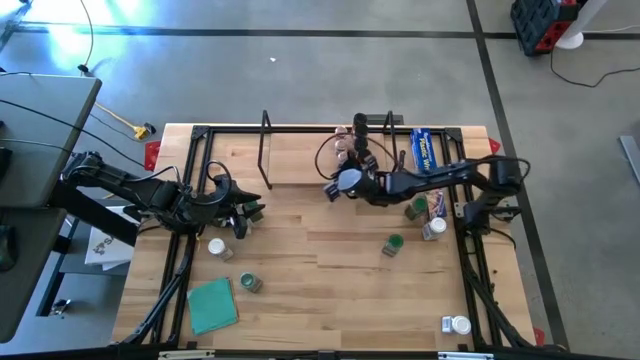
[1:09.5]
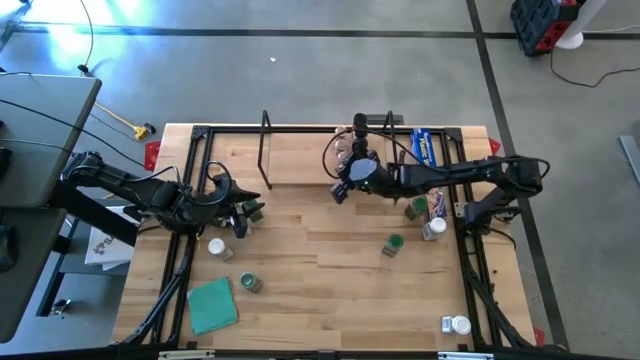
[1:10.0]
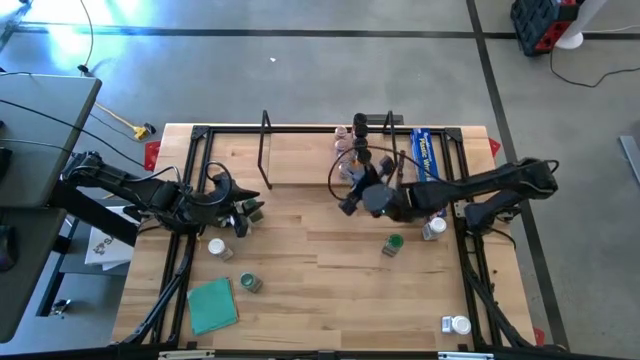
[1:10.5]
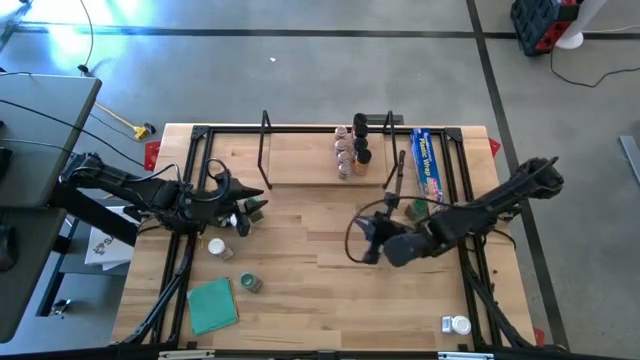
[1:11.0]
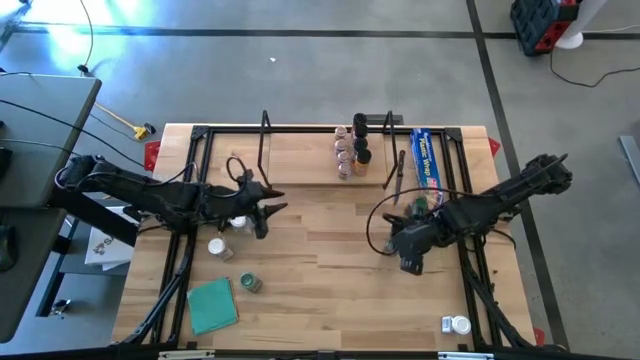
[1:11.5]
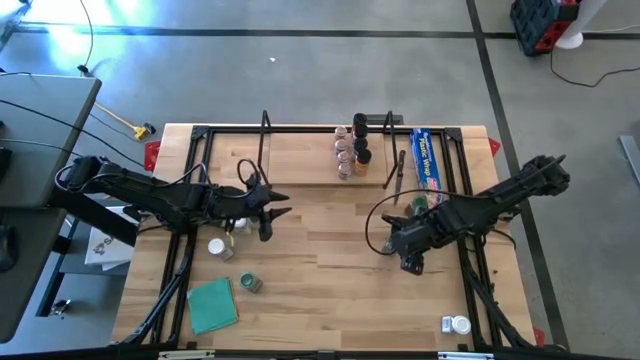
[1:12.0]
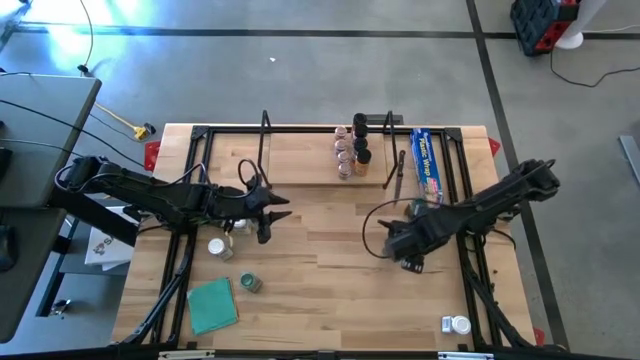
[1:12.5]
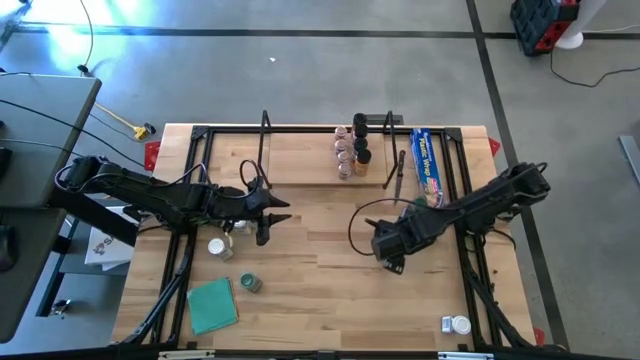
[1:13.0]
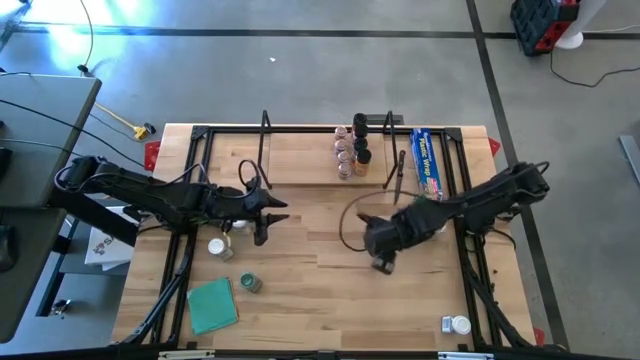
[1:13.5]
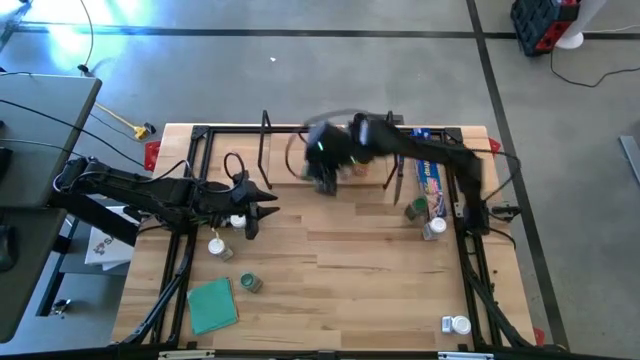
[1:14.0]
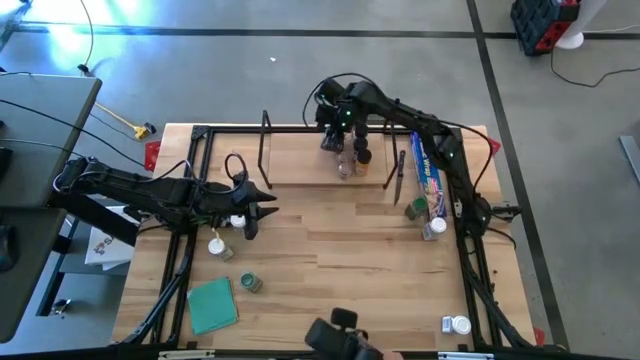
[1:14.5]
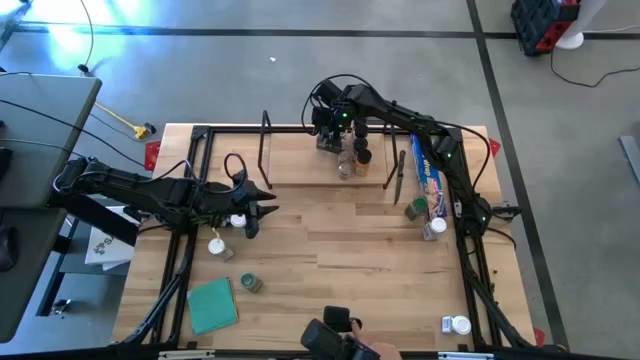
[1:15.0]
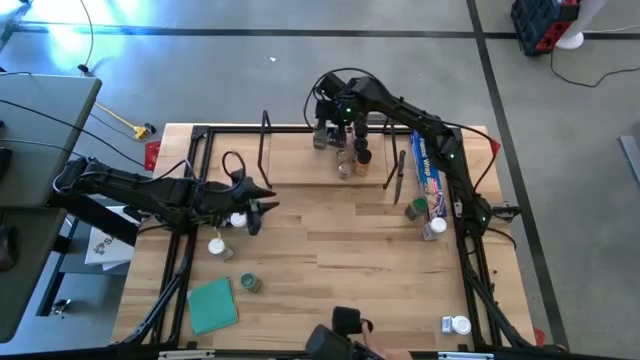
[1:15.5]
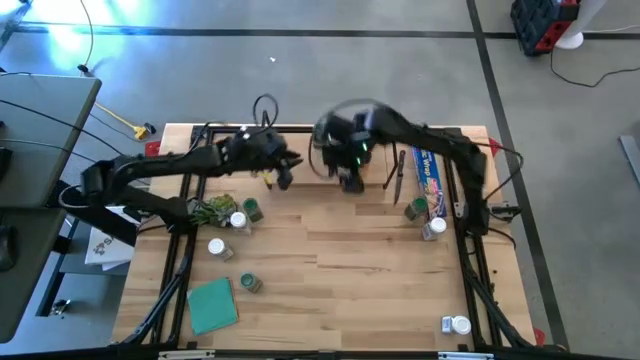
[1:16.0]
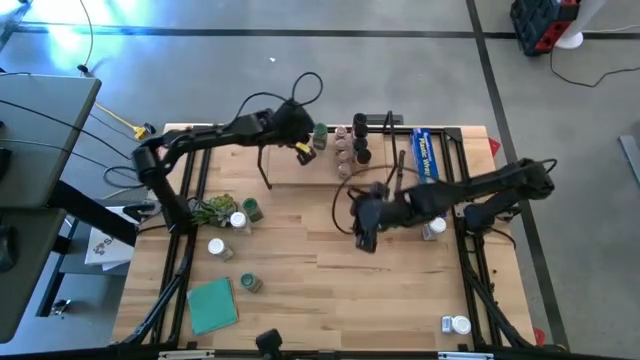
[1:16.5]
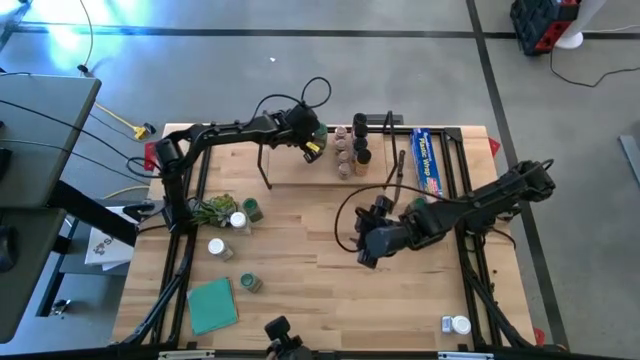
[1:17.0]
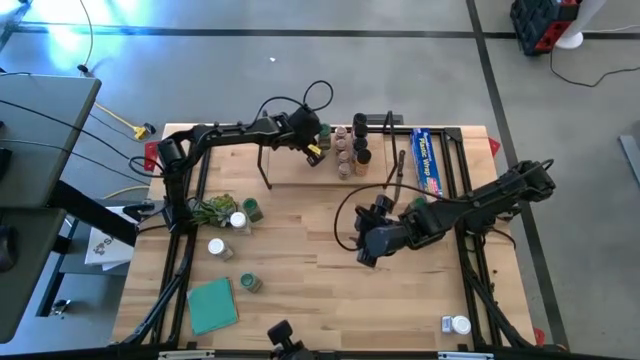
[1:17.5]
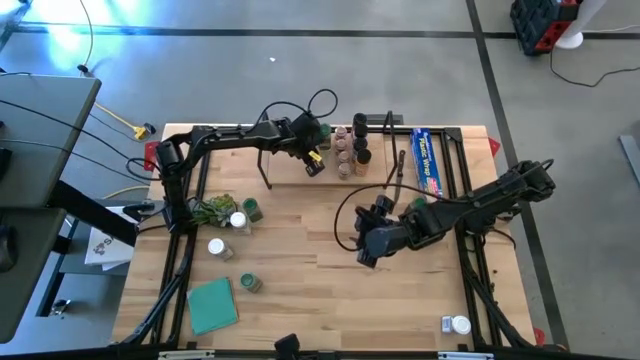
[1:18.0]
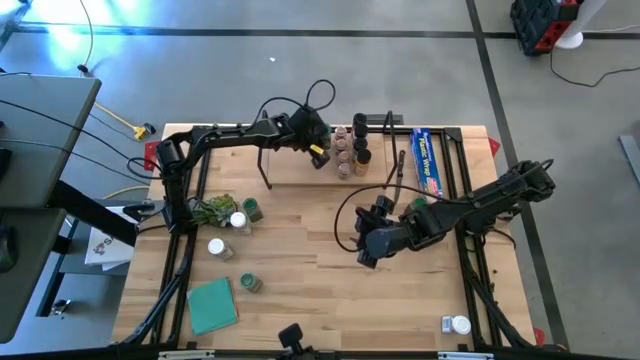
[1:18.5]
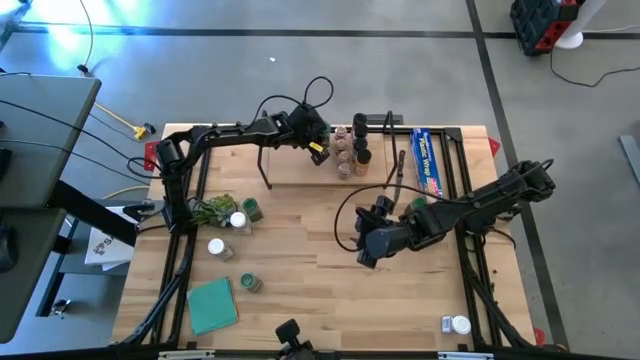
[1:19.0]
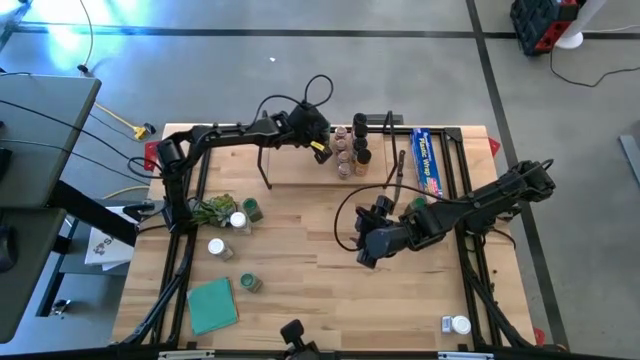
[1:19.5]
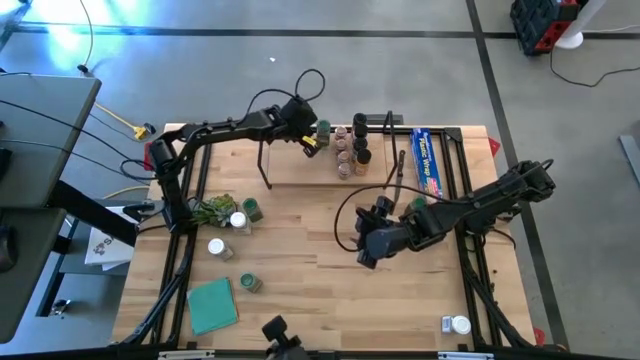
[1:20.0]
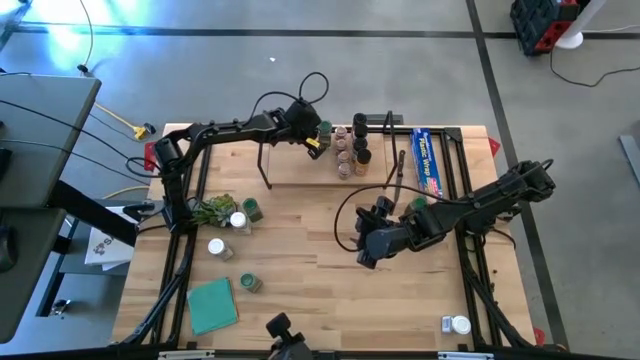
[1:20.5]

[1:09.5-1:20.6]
Task: Shelf spices
Put the green seasoning bottle on the shelf

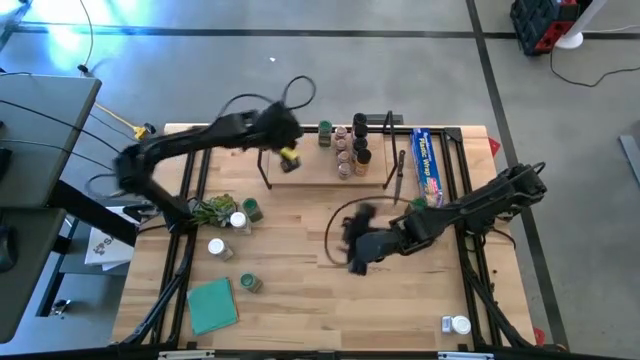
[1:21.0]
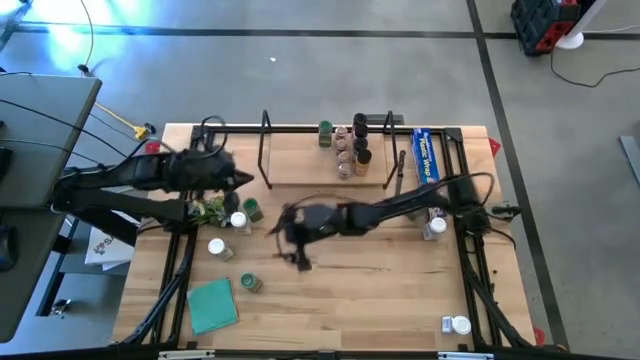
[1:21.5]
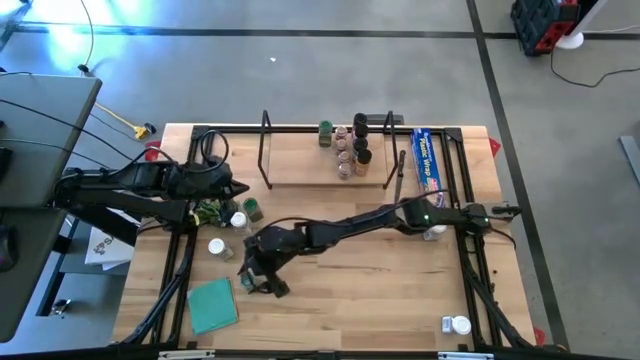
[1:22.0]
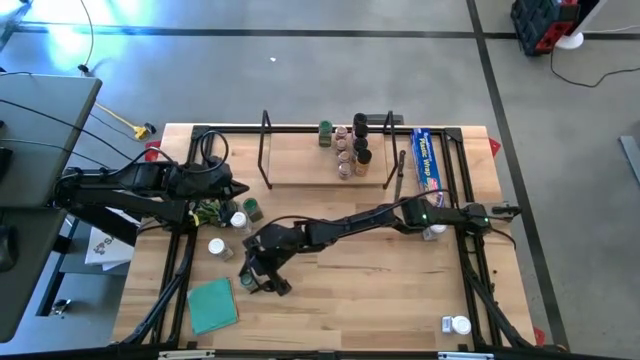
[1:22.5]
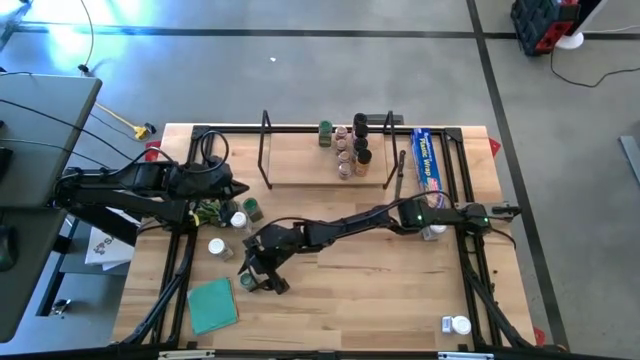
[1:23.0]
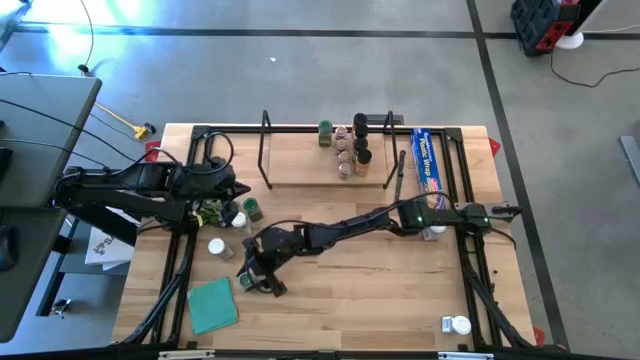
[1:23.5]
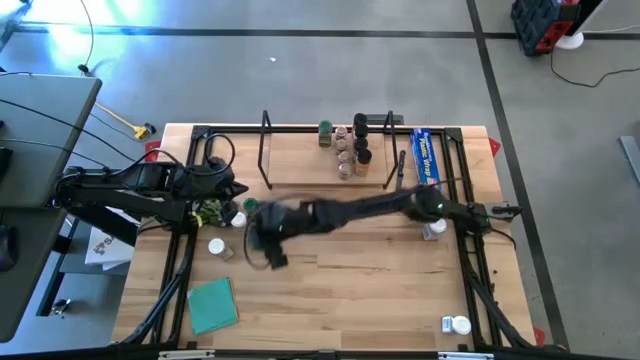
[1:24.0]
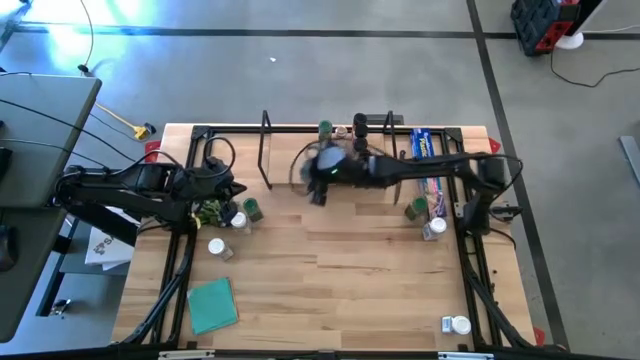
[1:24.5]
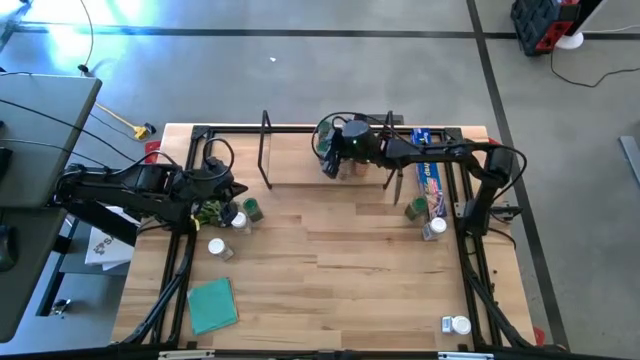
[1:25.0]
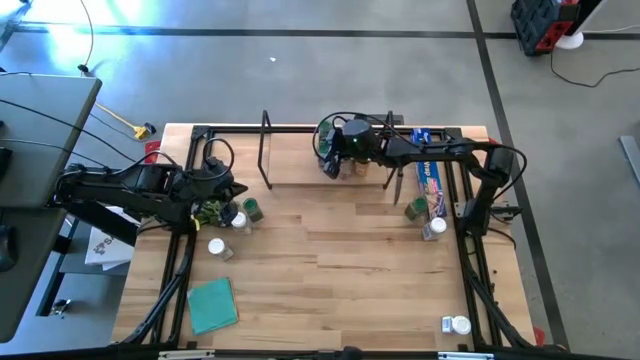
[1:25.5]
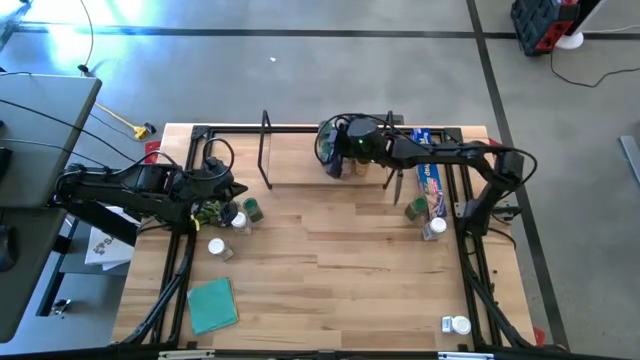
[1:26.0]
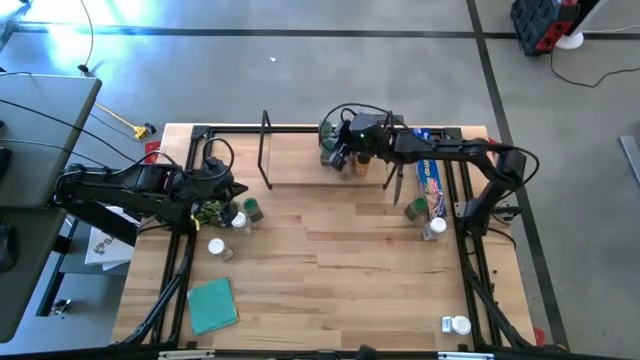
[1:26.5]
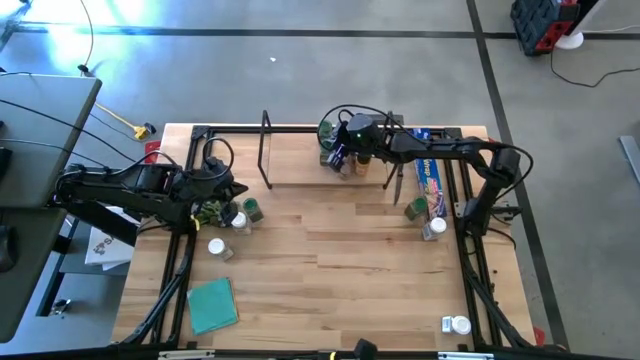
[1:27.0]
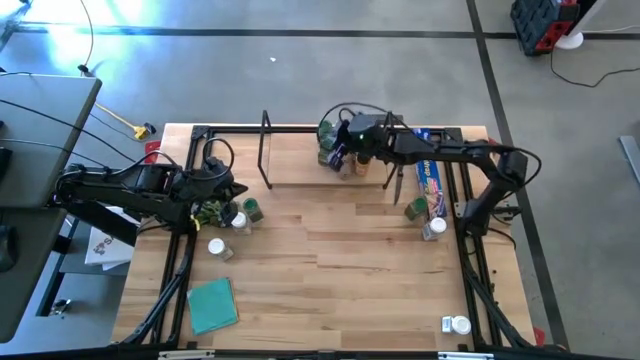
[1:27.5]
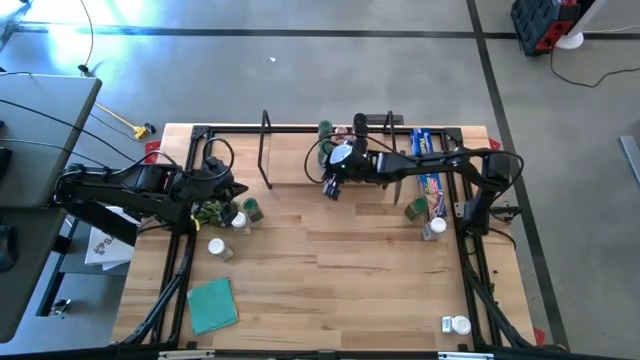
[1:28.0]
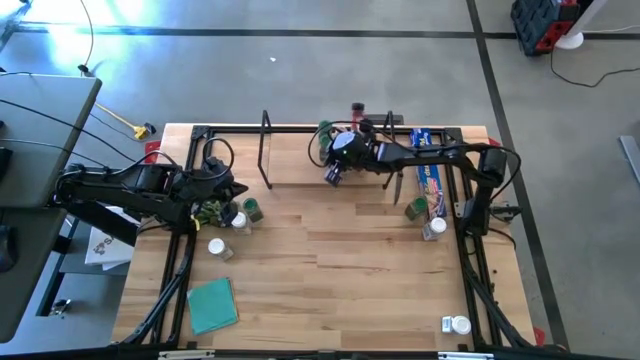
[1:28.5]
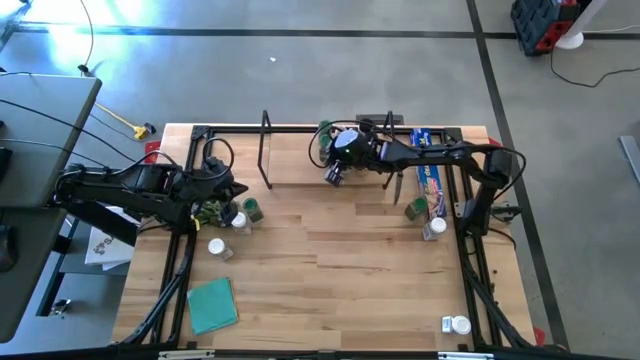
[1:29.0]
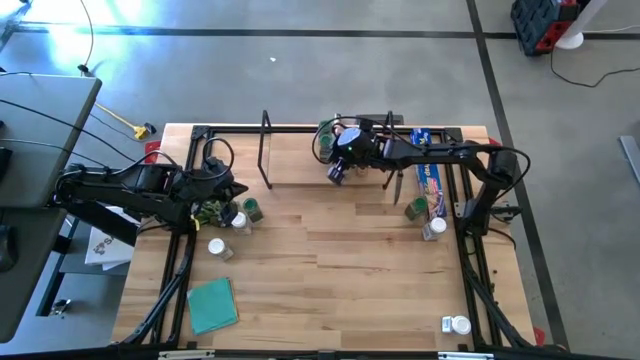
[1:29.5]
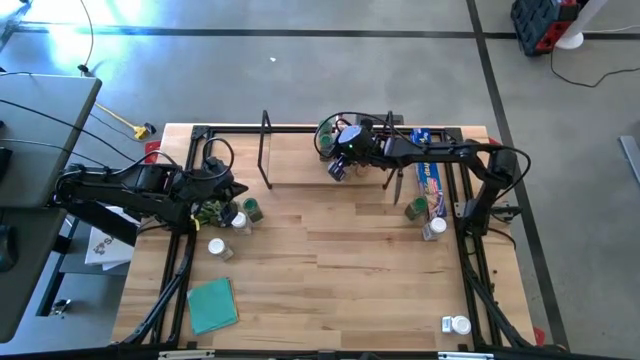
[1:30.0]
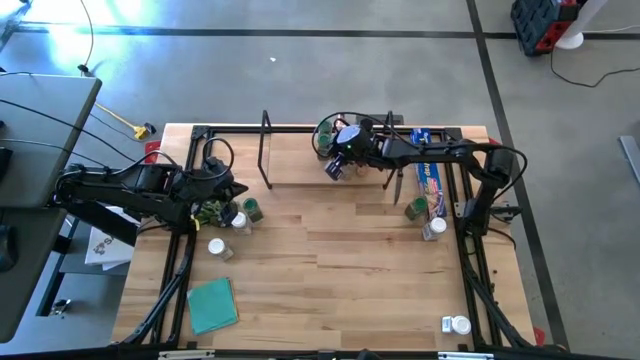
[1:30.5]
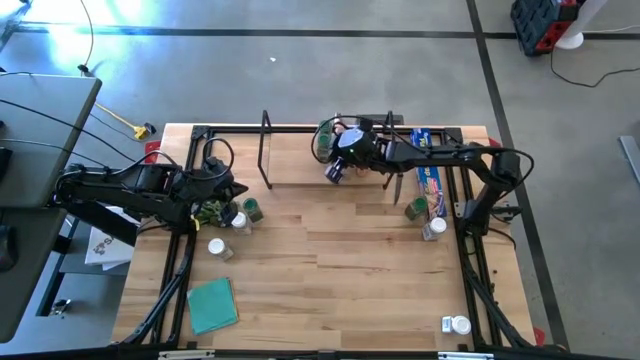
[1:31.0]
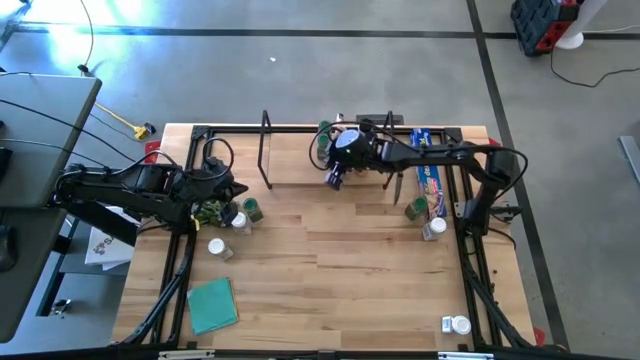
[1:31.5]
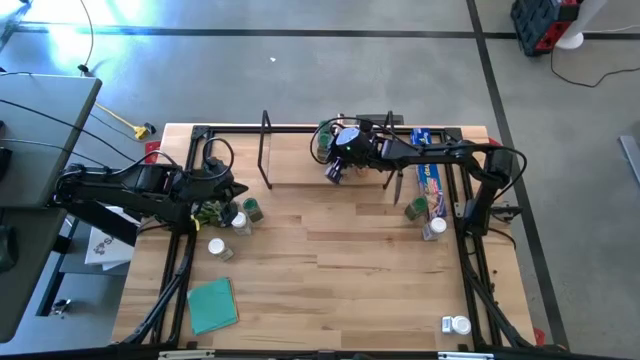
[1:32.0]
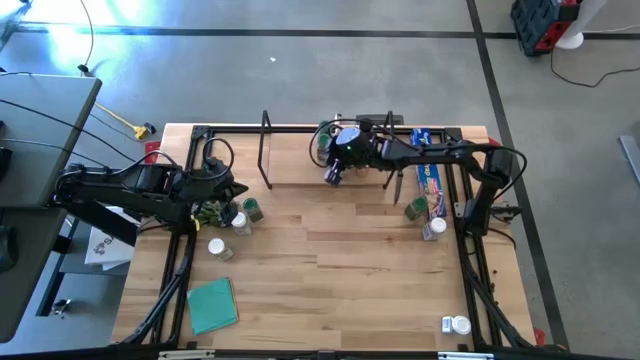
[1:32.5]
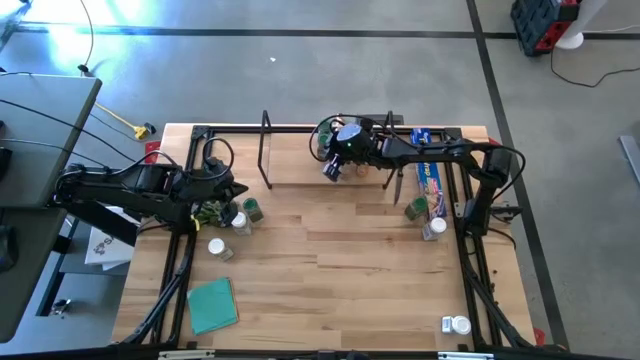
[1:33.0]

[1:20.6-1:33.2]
Put the green seasoning bottle on the shelf align with the other green seasoning bottle
